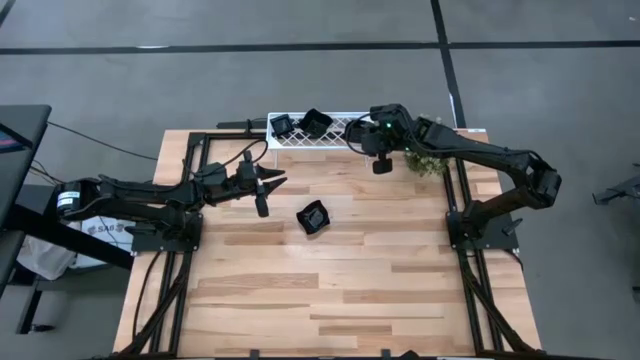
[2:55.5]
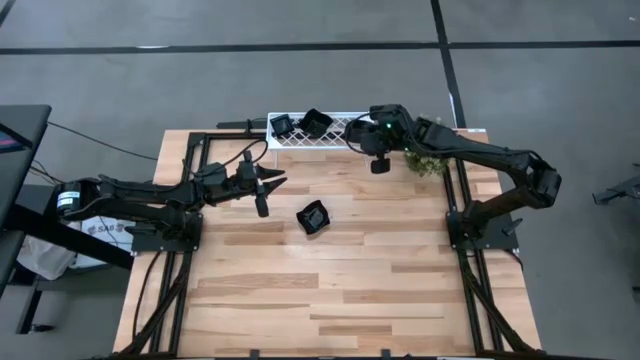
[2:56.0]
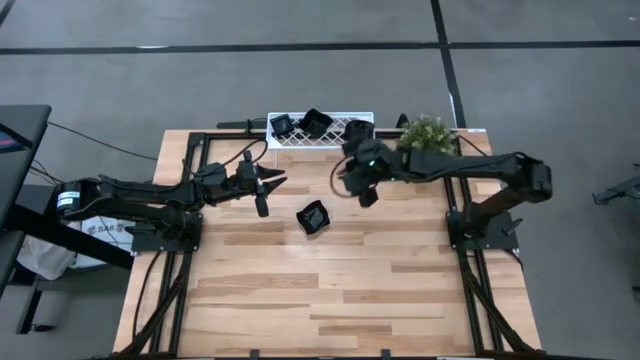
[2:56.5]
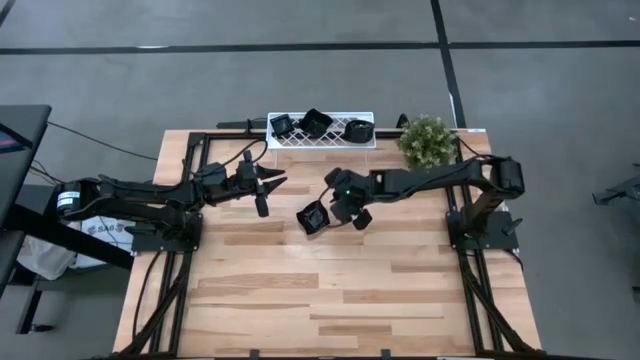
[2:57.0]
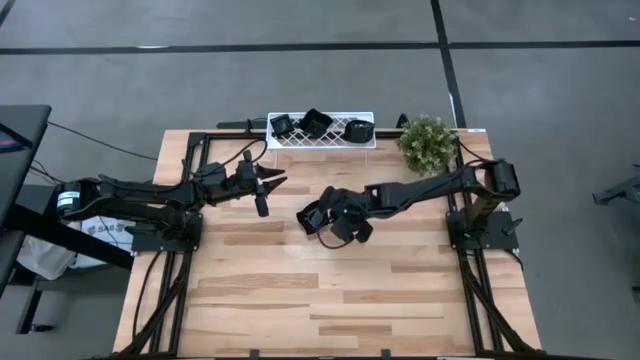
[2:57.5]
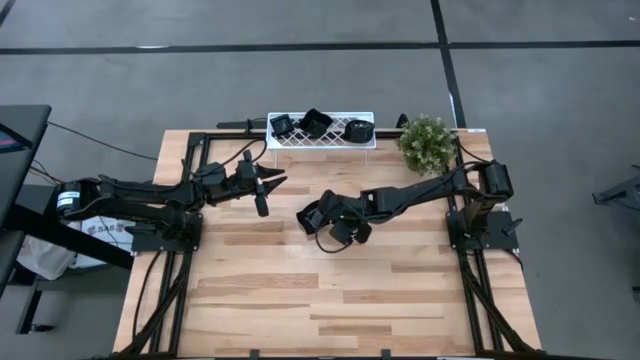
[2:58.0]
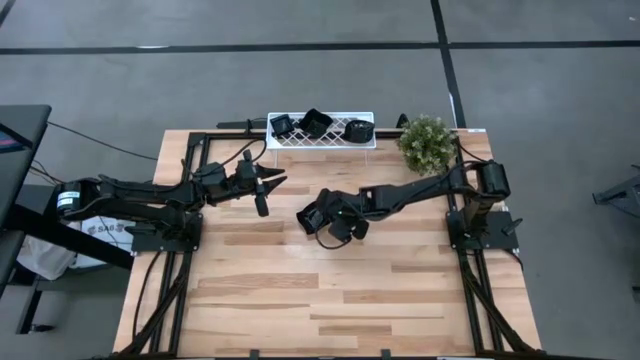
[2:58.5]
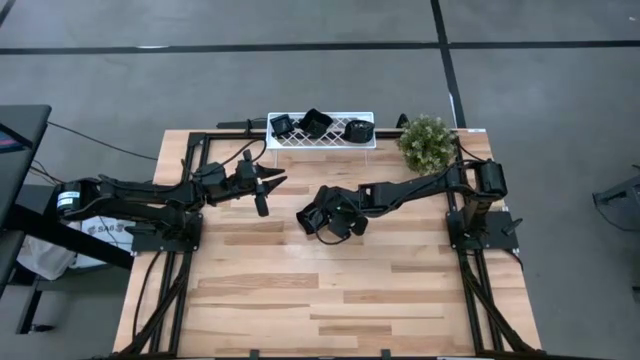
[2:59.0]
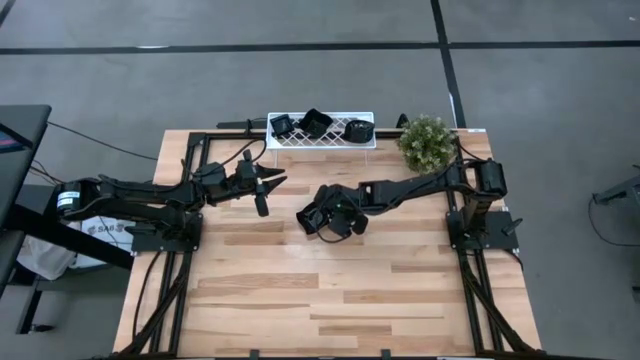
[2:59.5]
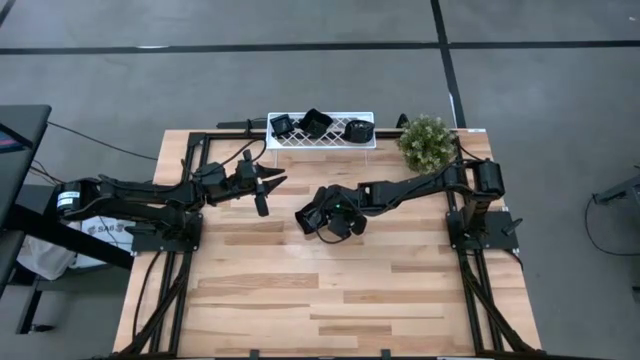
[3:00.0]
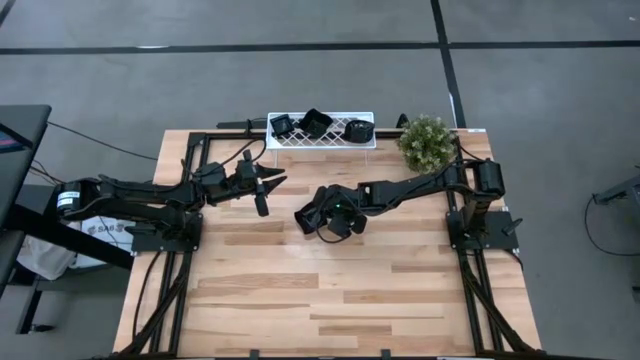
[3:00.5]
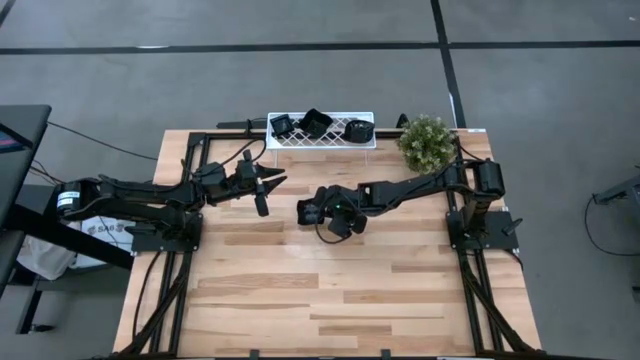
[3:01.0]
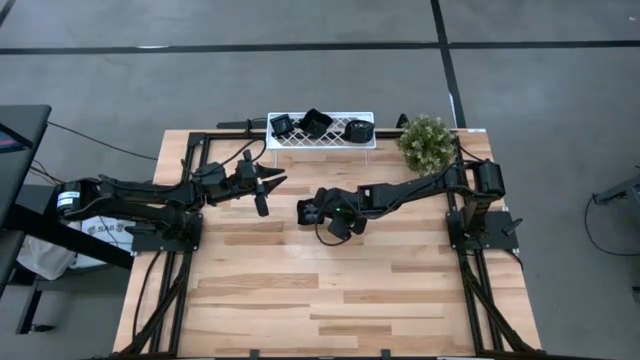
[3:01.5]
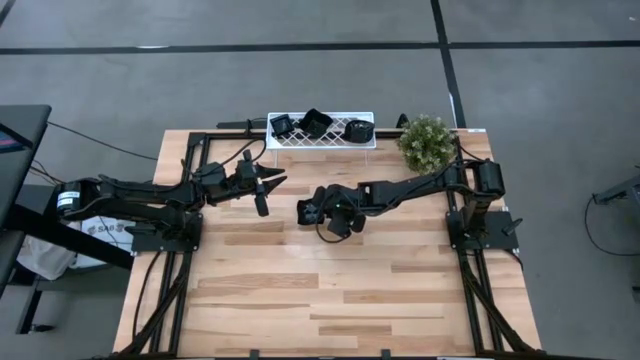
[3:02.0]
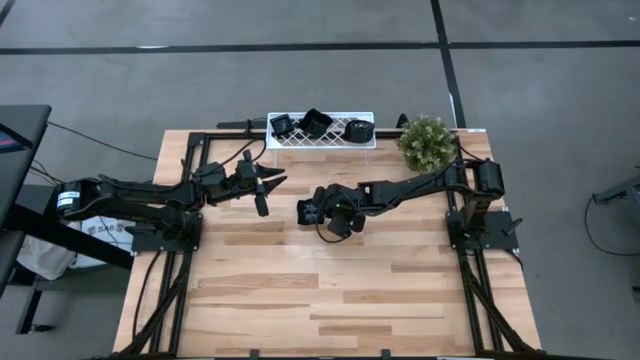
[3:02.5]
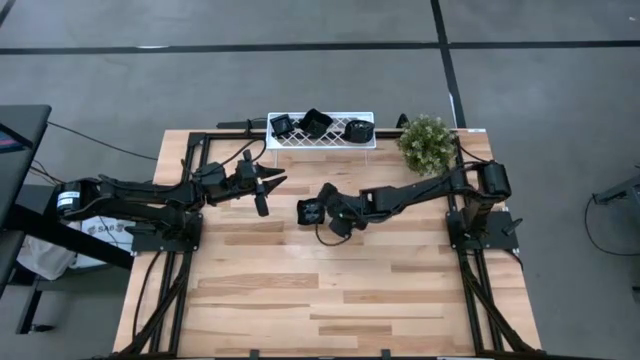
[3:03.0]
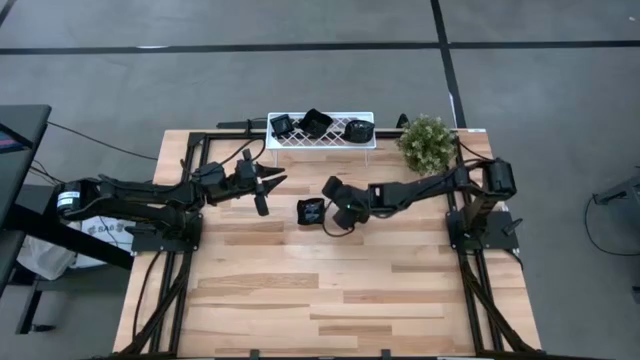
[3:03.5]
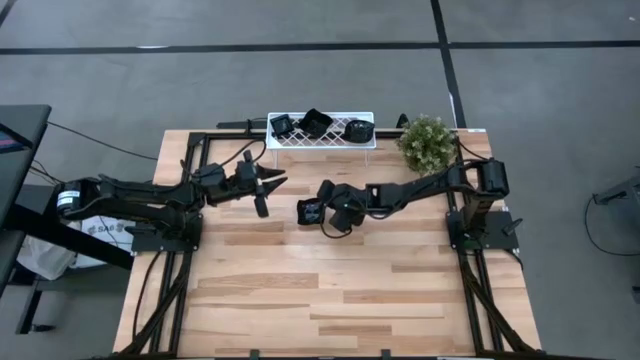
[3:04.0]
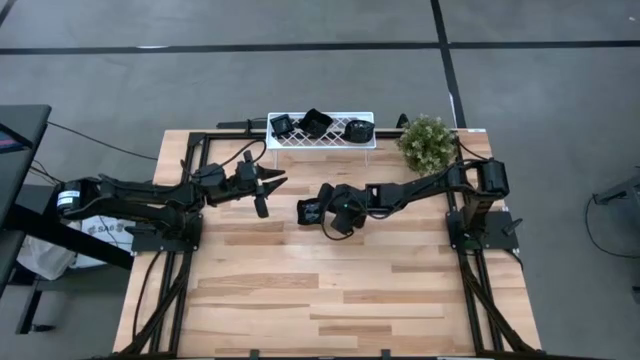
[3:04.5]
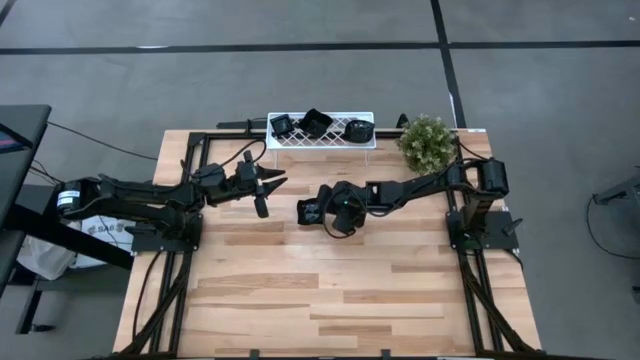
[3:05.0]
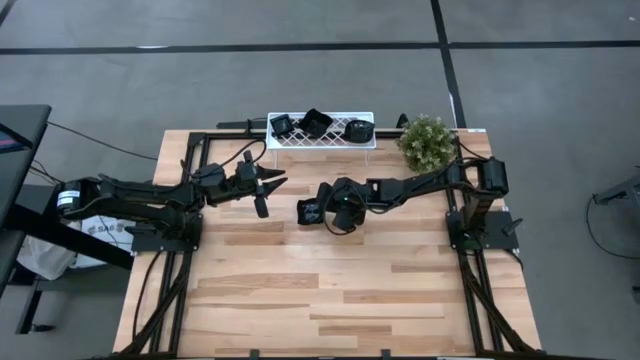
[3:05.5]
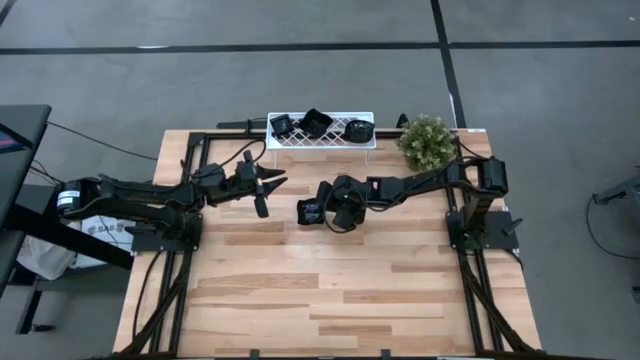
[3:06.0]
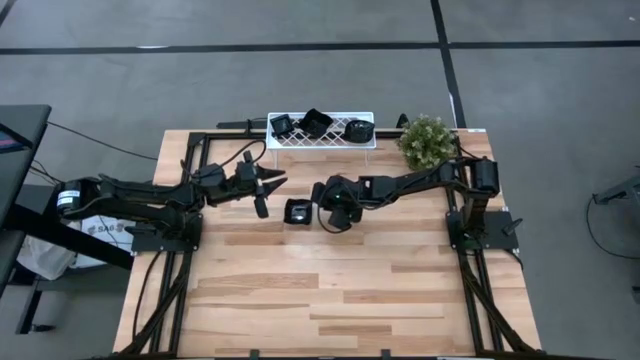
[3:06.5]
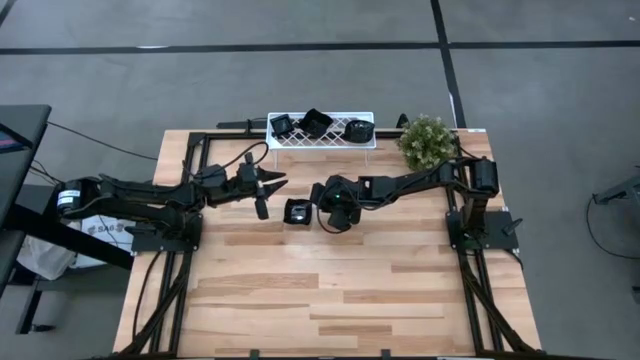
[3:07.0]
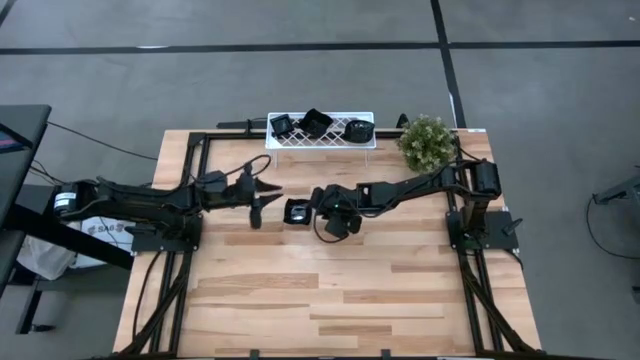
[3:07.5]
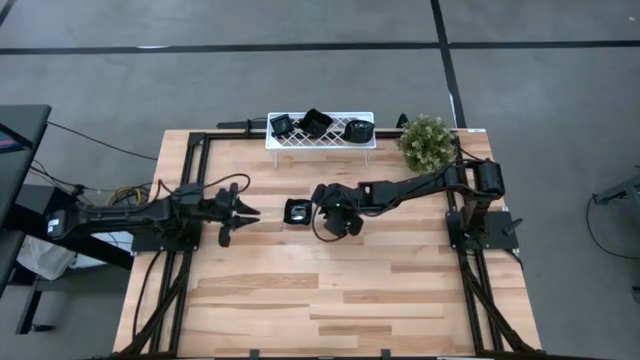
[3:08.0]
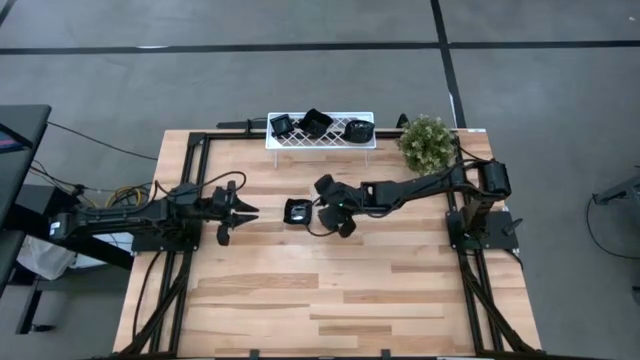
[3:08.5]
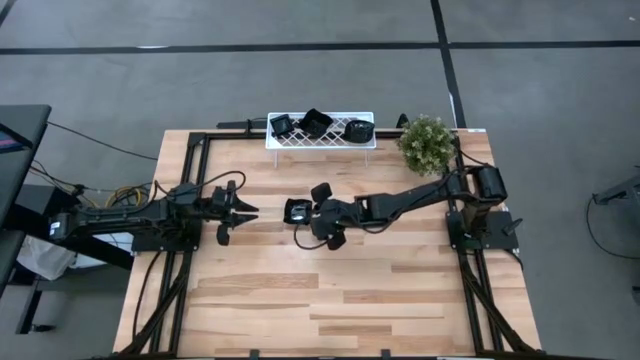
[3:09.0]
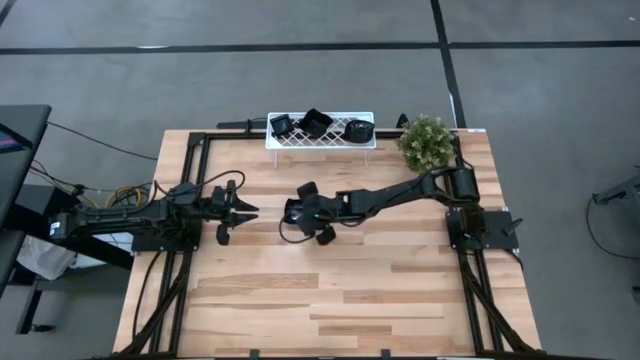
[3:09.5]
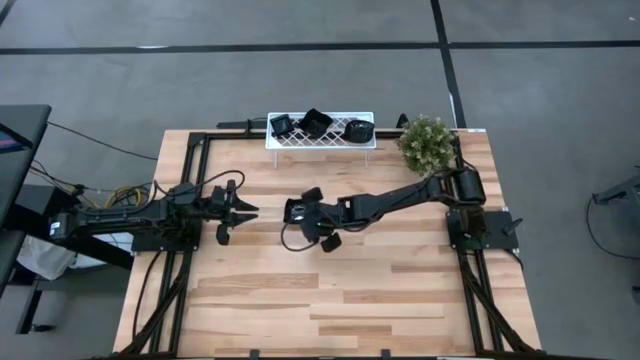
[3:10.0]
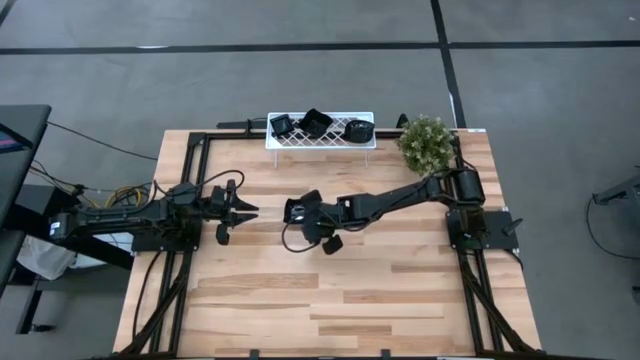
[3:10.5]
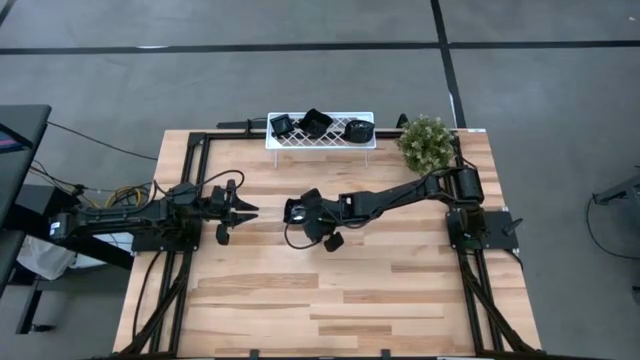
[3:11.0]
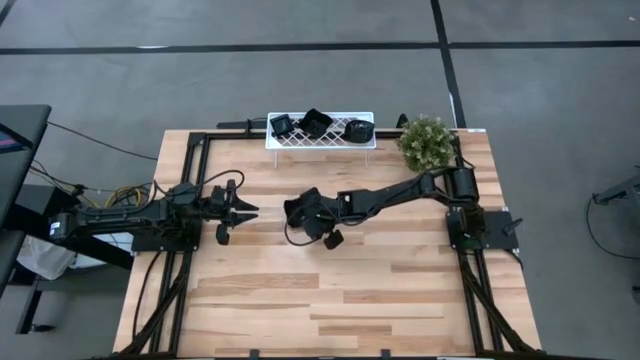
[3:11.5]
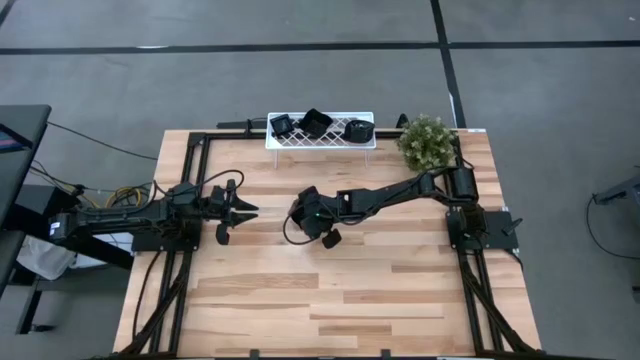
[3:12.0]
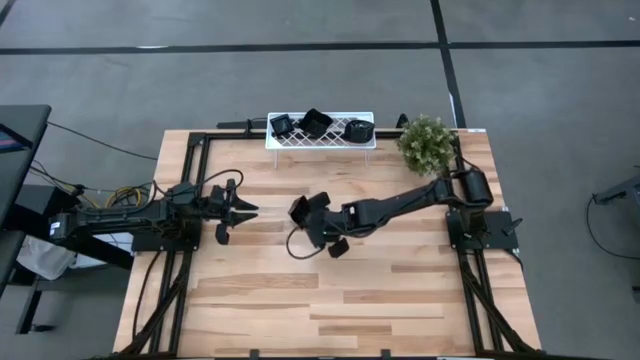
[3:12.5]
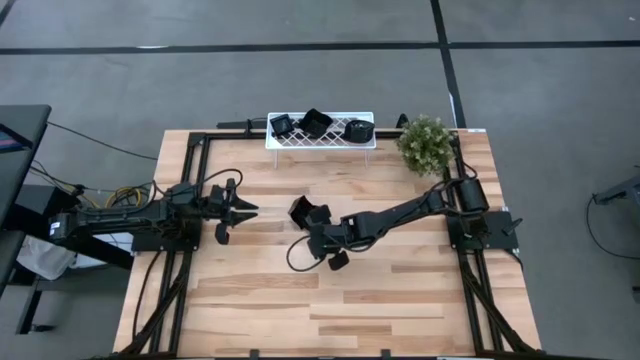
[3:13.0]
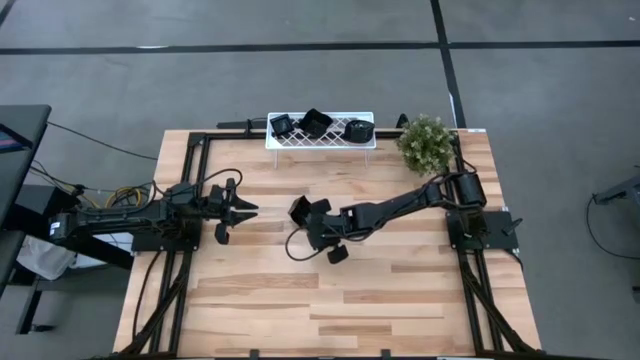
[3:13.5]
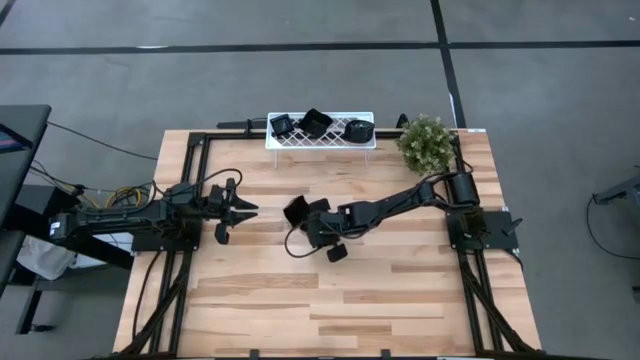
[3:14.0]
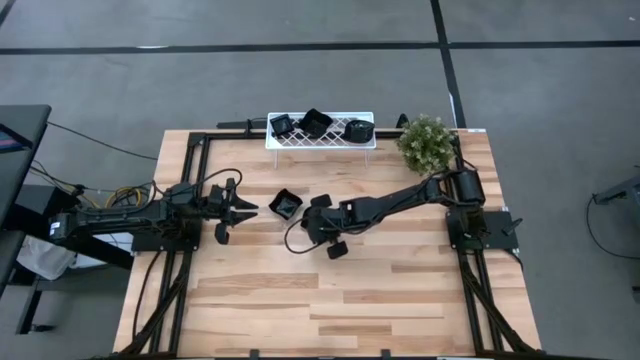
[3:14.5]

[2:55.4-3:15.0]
Task: Pick & Place Mini shaped plates
Stack the black leaf shaped plate on top of the black leaf shaped plate on the shelf

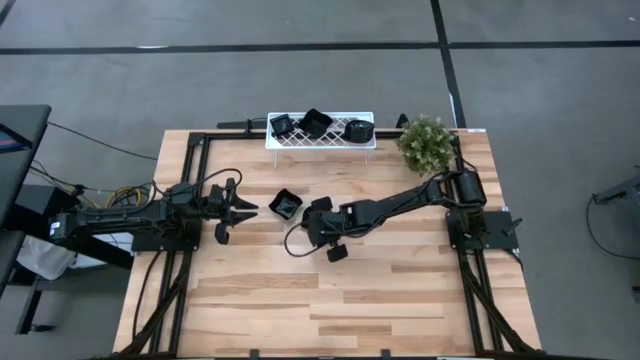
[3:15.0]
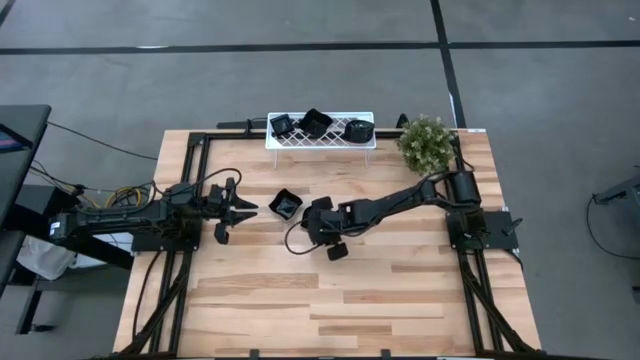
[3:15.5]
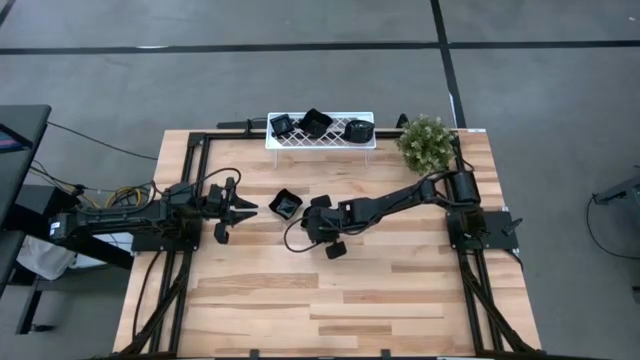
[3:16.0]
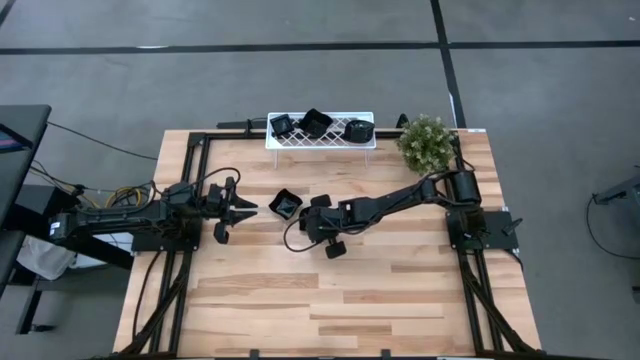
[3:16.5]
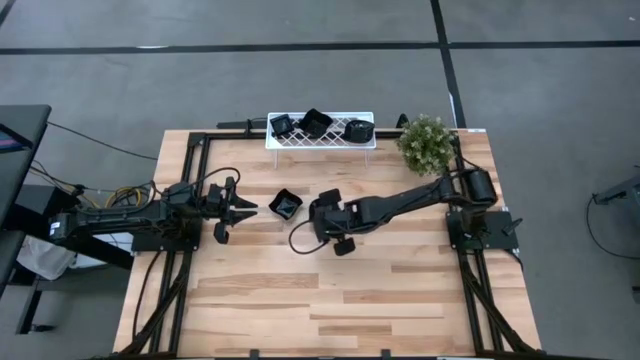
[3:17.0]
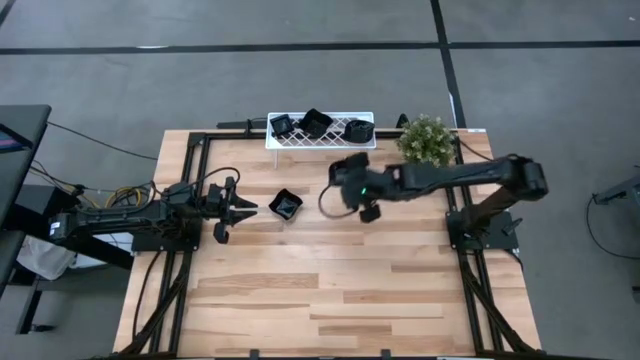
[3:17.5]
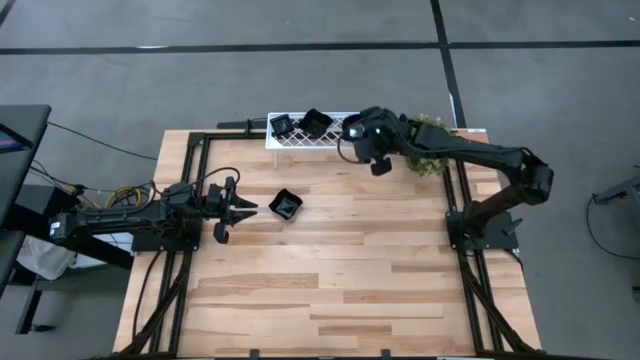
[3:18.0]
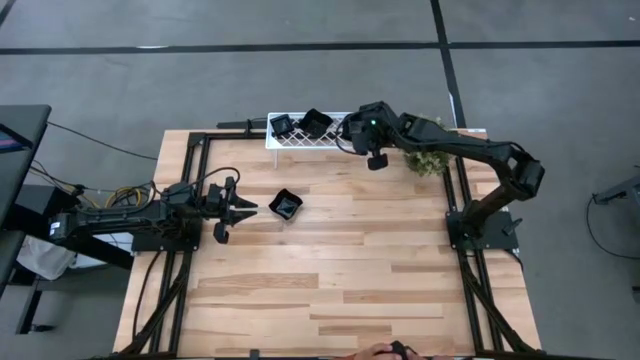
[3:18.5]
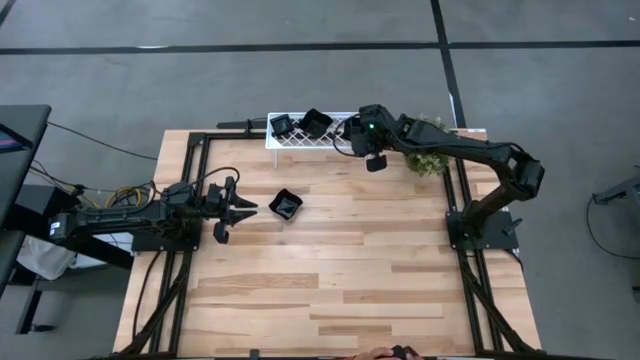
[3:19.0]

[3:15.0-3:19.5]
Stack the black leaf shaped plate on top of the black leaf shaped plate on the shelf
